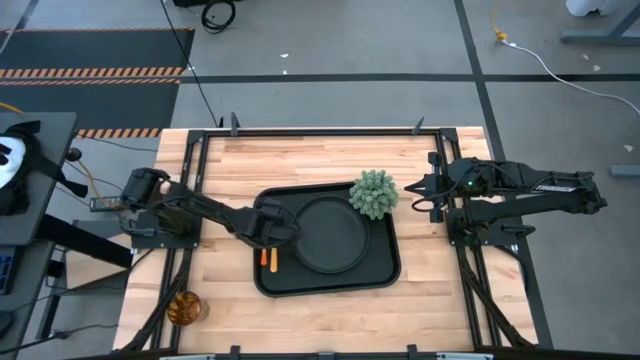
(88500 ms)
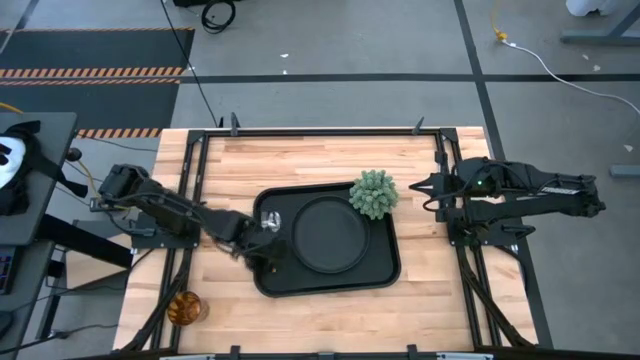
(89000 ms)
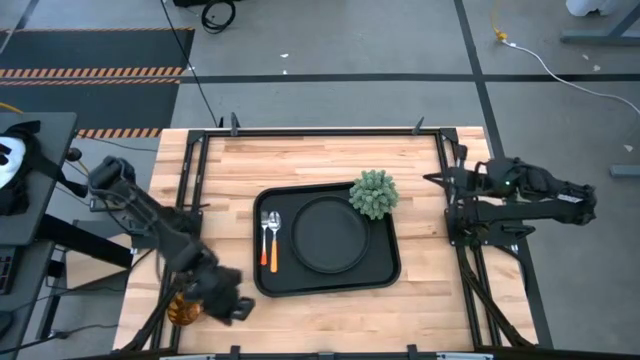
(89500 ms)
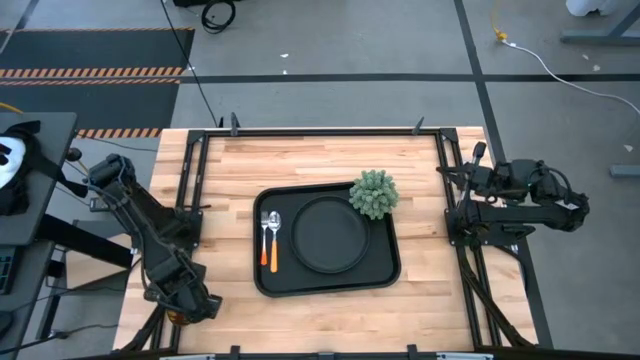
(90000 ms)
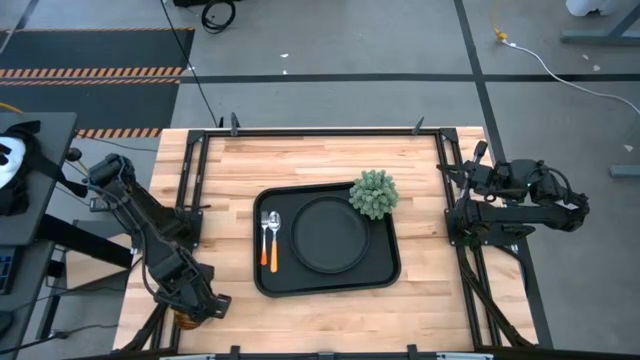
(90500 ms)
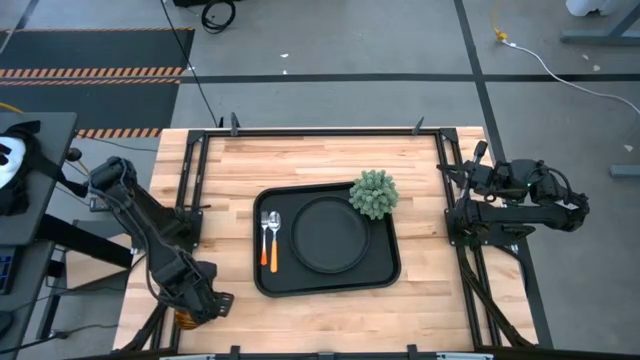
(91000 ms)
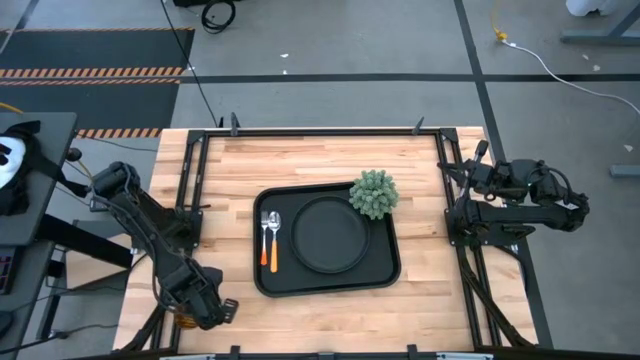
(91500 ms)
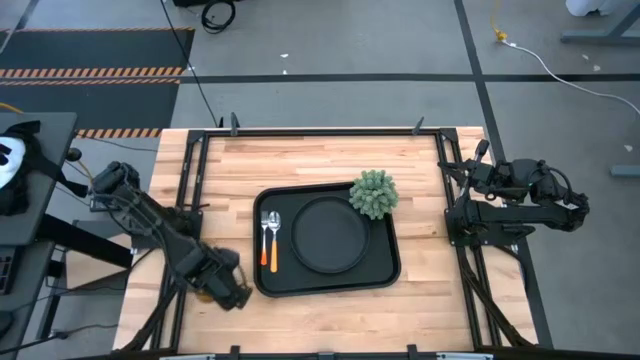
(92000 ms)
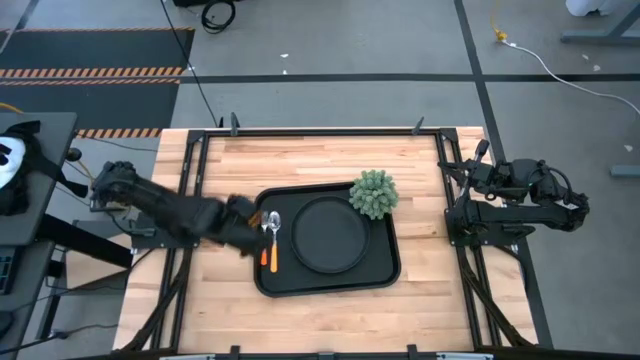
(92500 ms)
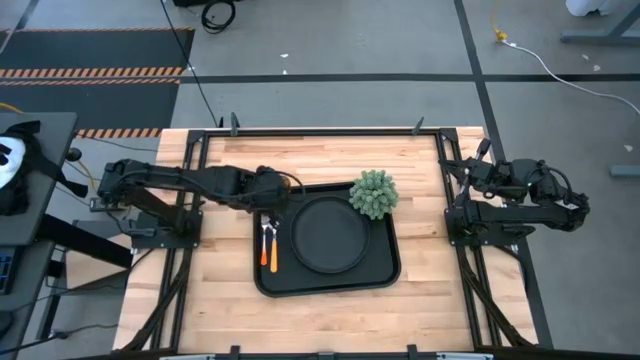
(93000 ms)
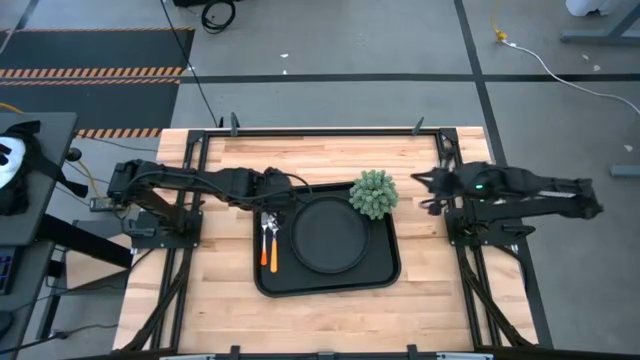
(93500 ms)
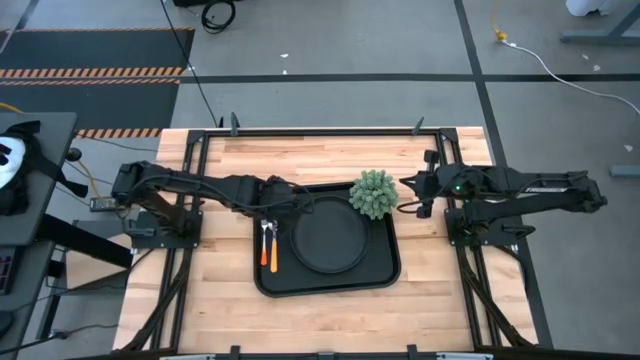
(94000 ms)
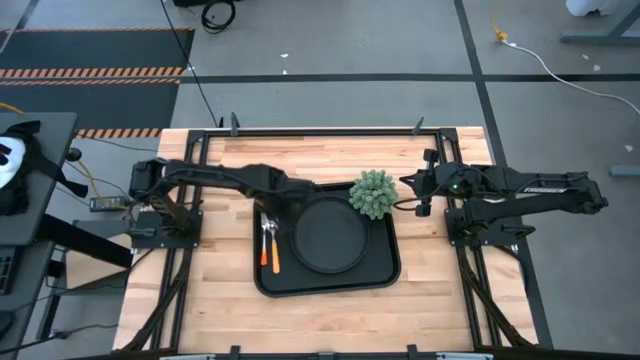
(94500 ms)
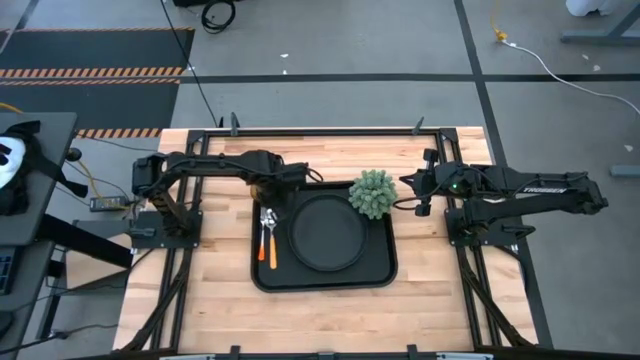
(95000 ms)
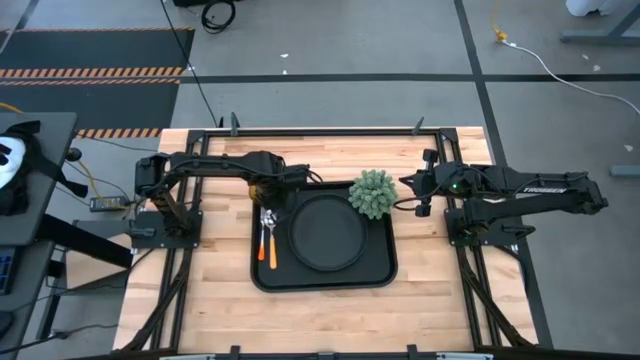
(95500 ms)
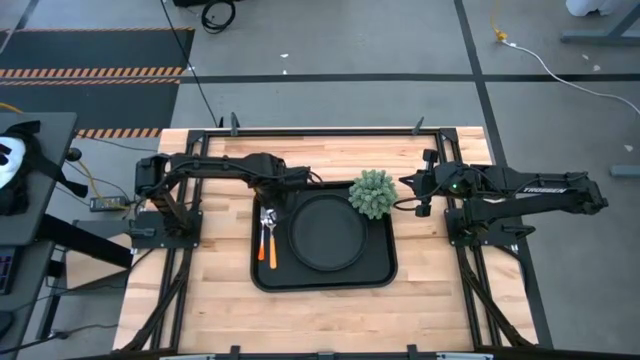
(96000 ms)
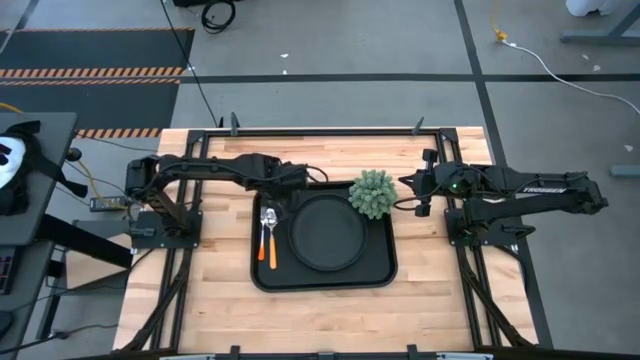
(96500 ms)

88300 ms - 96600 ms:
Task: Pick and place plate/cup/fork/spoon on tray
Put the brown cup on the black tray to the top of the orange spoon

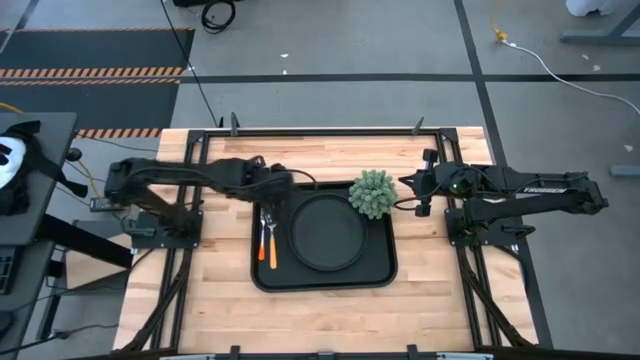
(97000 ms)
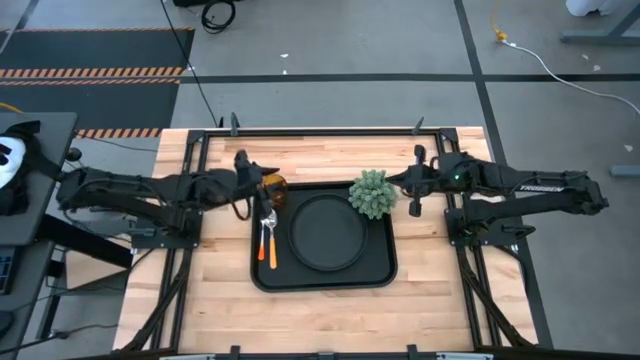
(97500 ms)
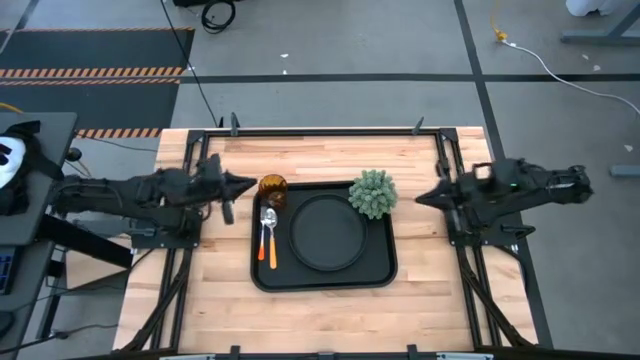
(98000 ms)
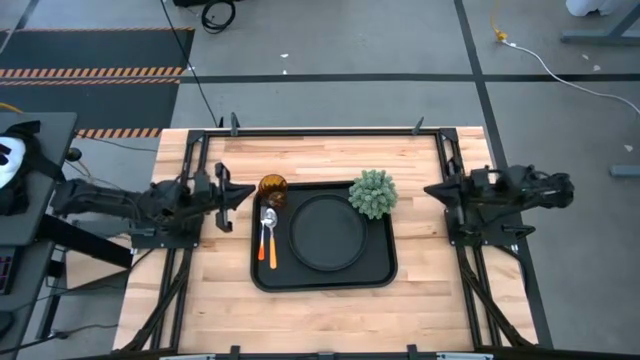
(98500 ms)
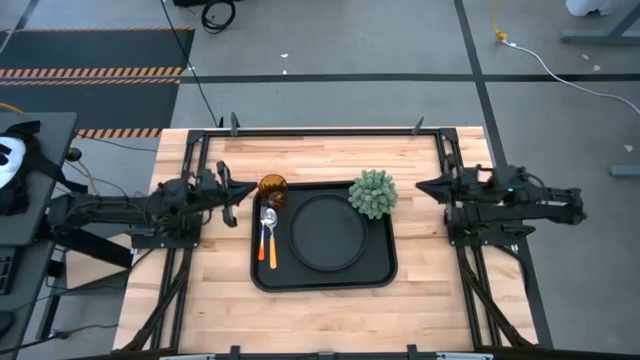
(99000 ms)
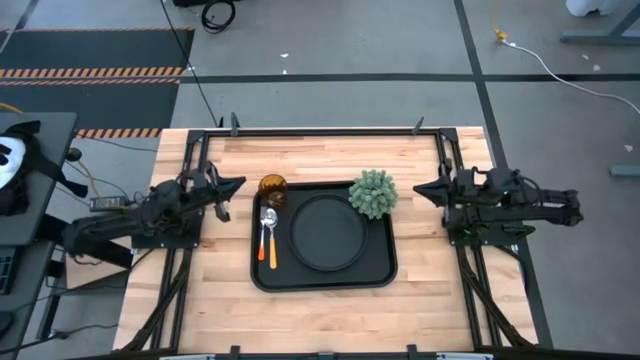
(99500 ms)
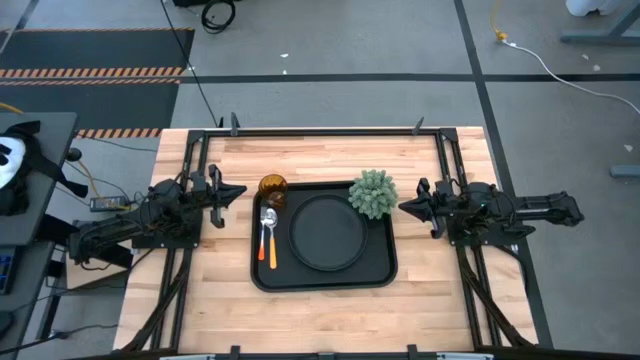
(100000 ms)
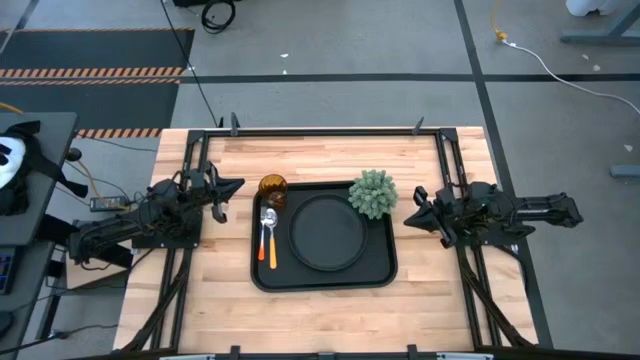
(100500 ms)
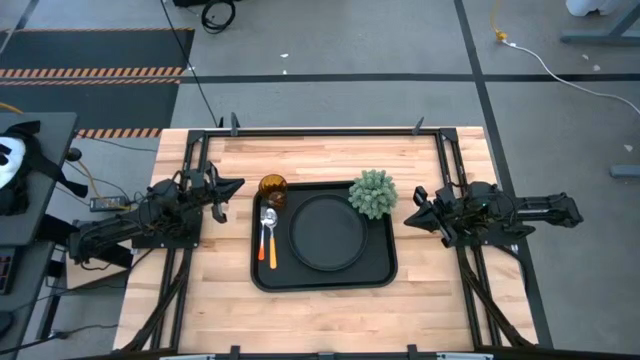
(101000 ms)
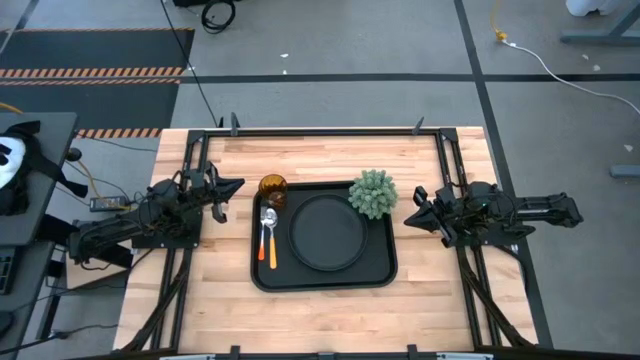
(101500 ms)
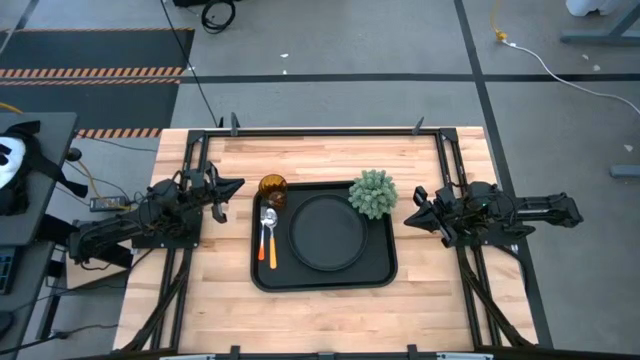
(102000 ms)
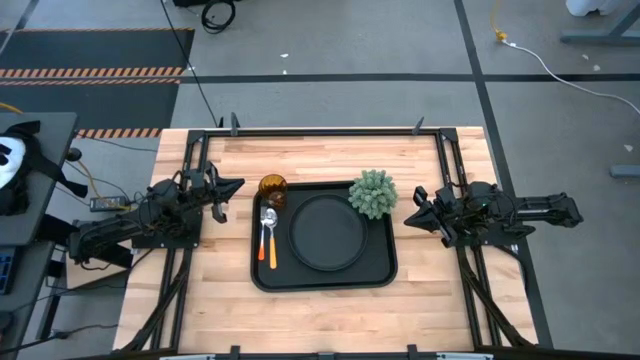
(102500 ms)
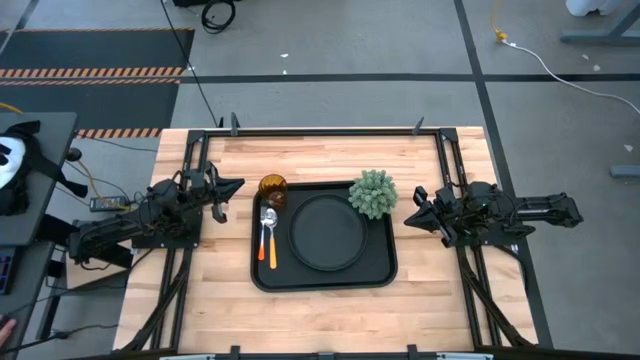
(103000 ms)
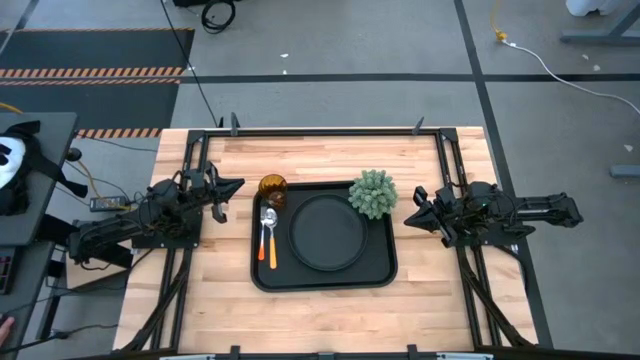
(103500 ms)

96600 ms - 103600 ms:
Return to Home Position

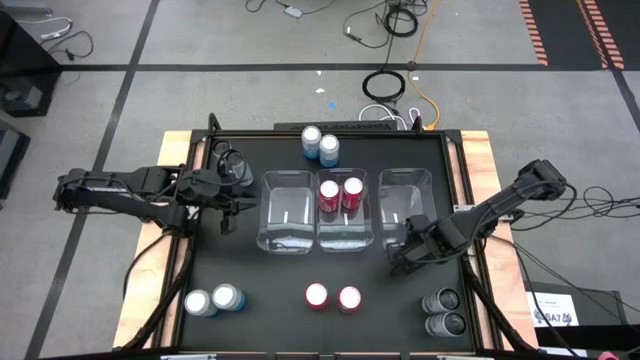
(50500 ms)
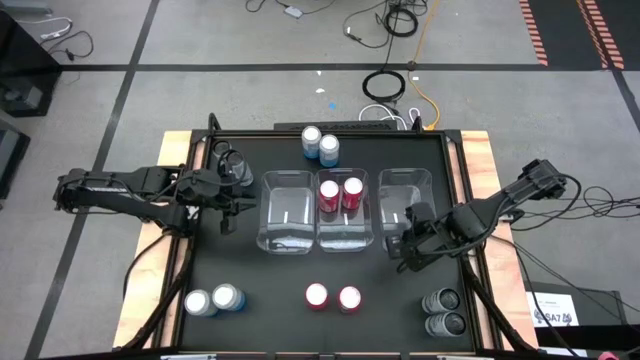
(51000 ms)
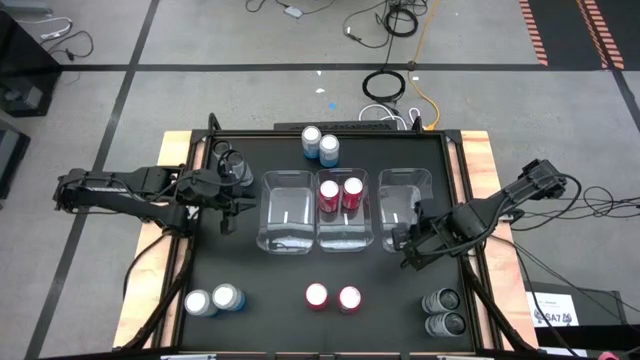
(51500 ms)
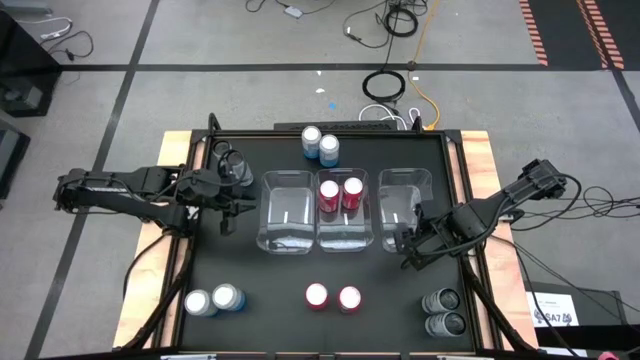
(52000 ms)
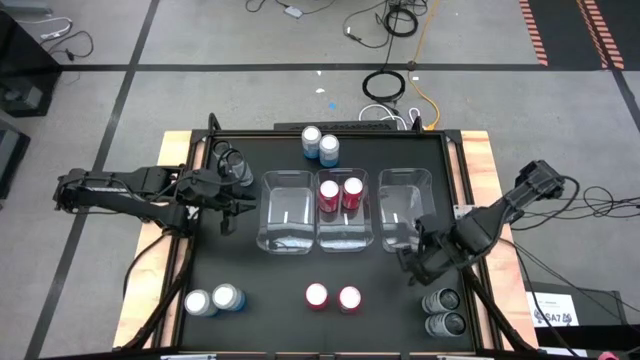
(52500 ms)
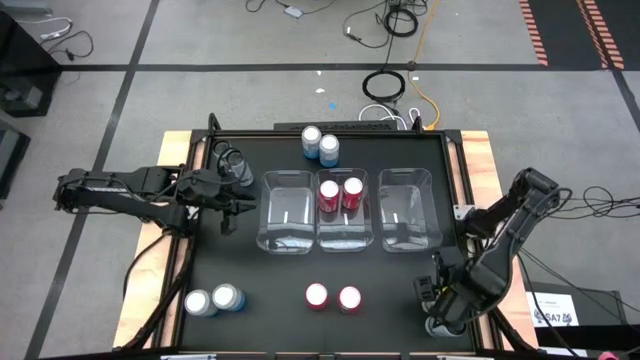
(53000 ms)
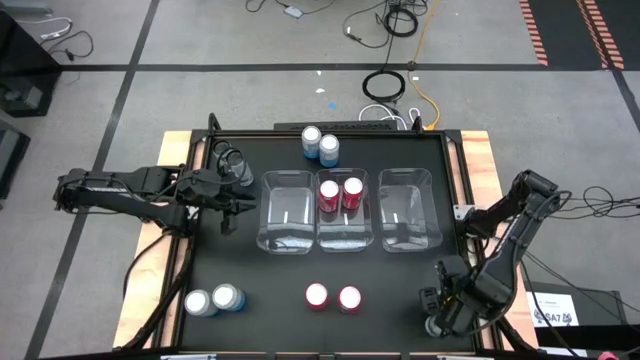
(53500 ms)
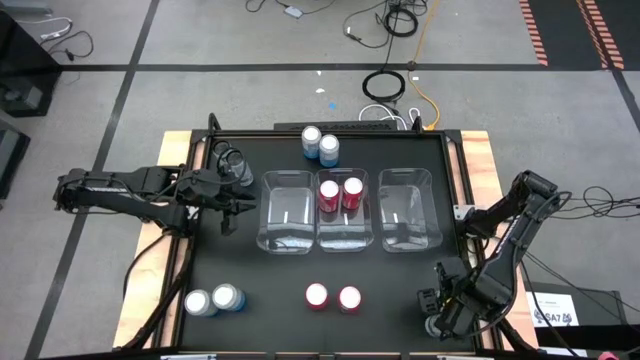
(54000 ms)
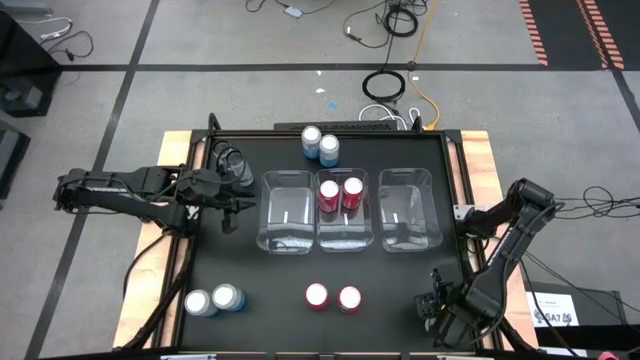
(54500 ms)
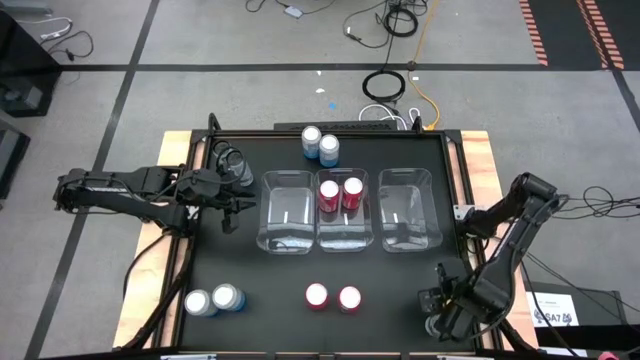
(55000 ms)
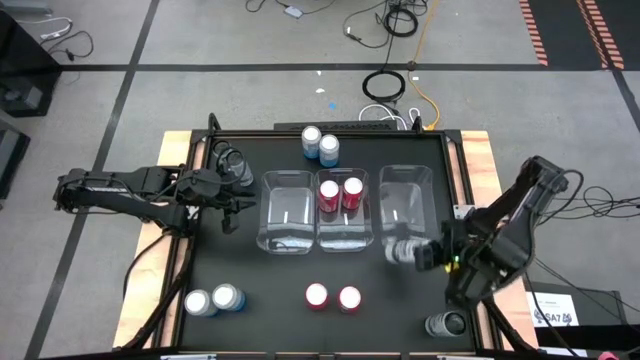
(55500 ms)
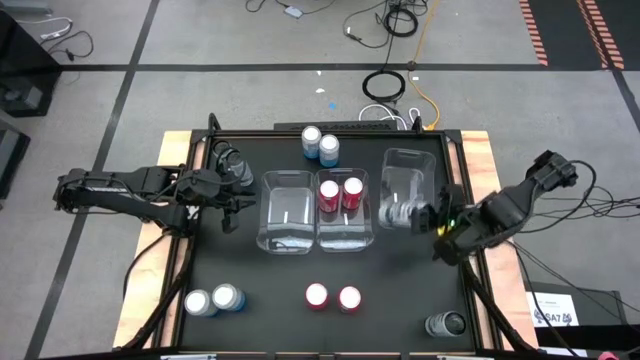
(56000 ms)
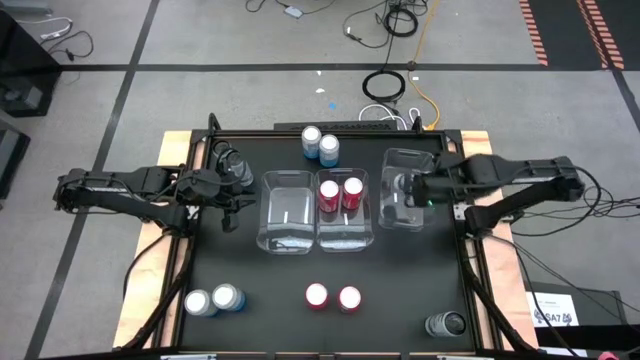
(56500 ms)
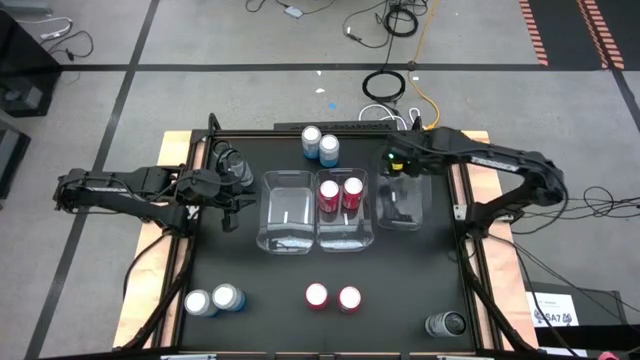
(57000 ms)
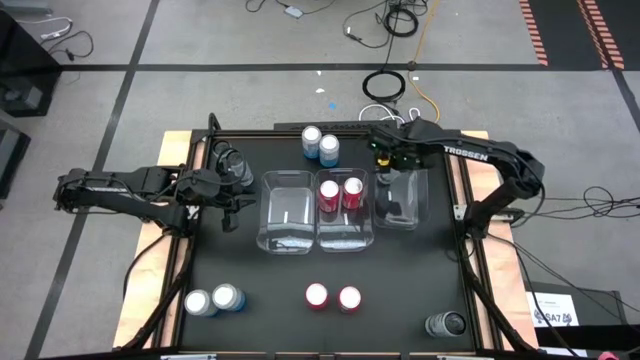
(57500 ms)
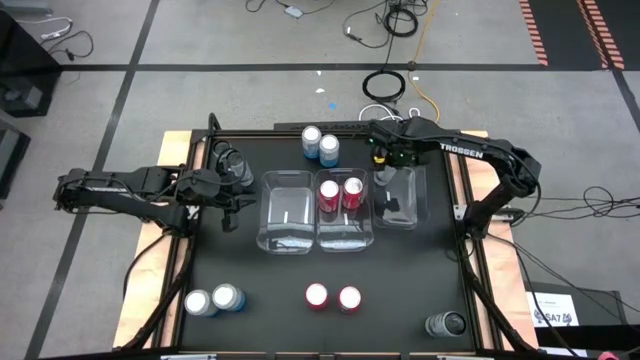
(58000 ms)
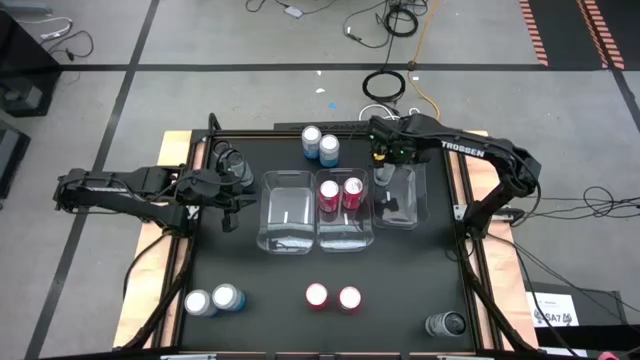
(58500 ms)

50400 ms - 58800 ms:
Task: Sort soda cans
Put the white-blue soda can into the right transparent bin
